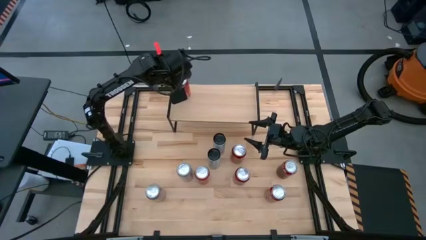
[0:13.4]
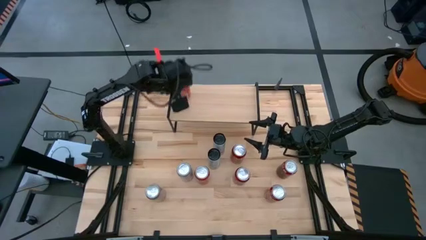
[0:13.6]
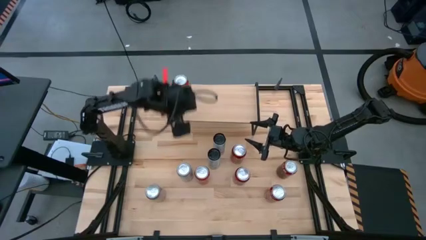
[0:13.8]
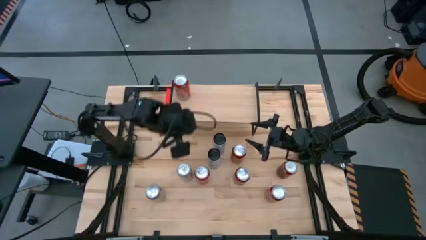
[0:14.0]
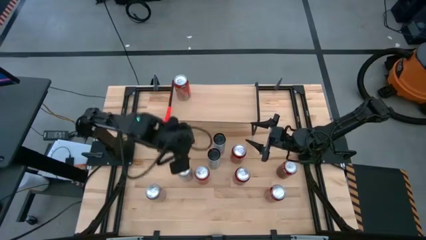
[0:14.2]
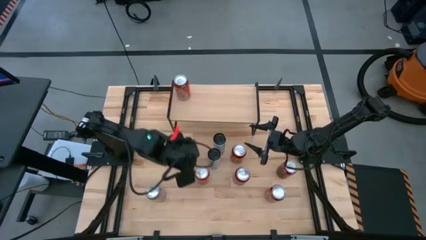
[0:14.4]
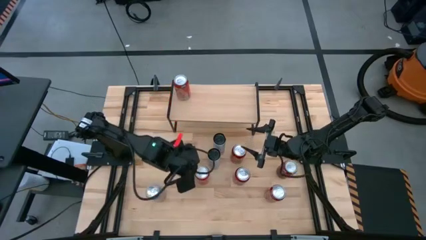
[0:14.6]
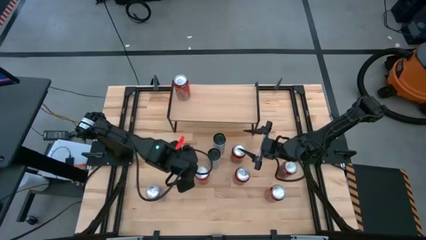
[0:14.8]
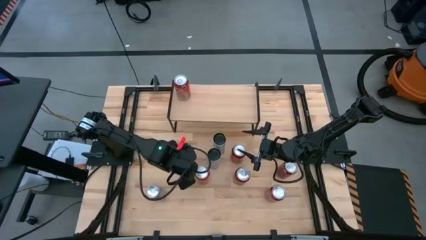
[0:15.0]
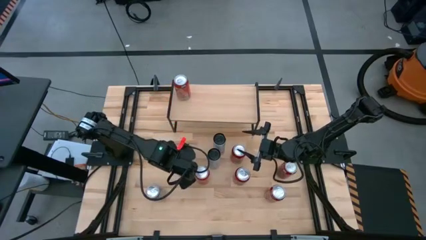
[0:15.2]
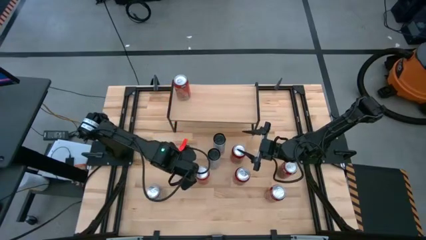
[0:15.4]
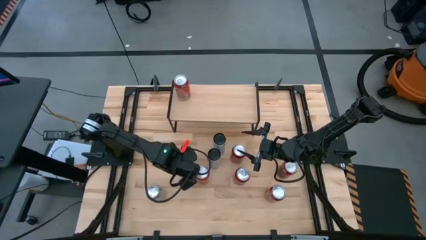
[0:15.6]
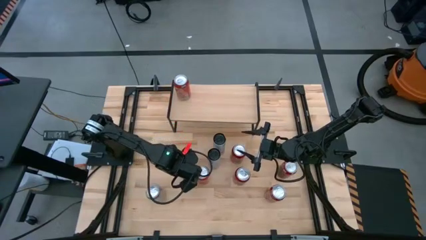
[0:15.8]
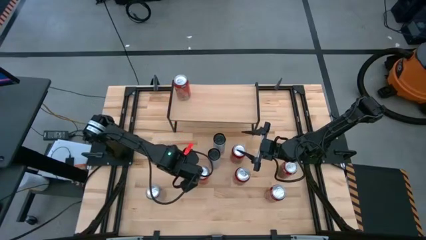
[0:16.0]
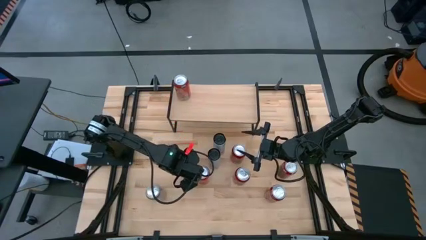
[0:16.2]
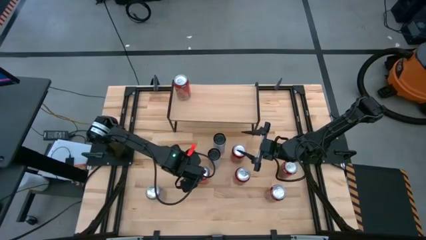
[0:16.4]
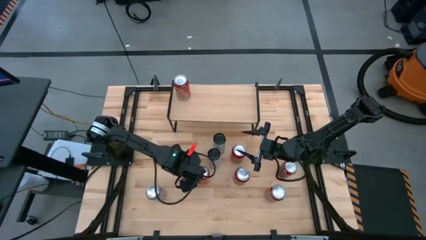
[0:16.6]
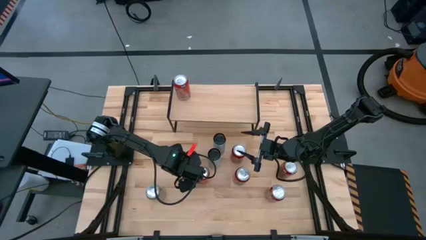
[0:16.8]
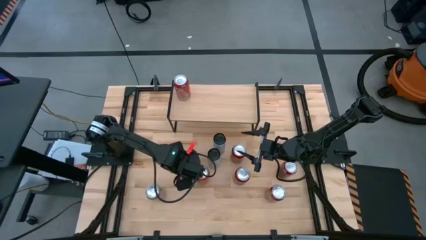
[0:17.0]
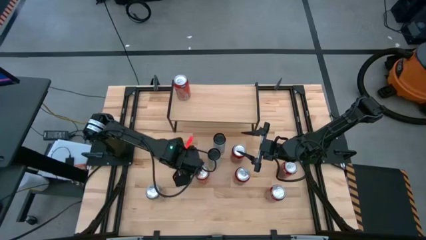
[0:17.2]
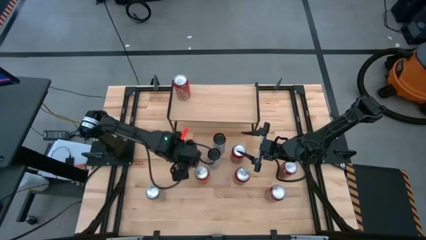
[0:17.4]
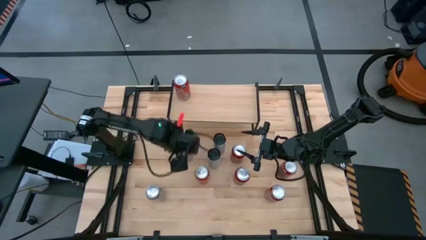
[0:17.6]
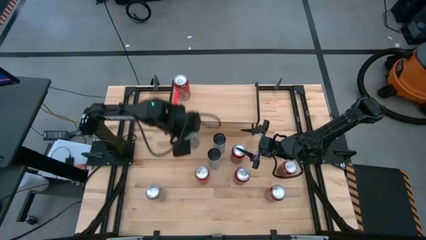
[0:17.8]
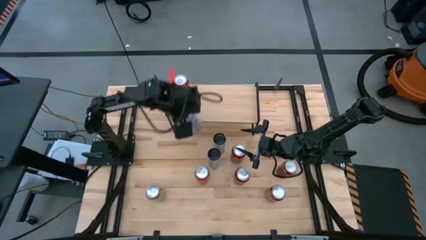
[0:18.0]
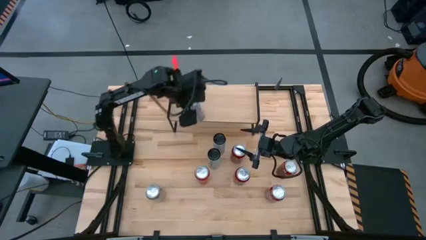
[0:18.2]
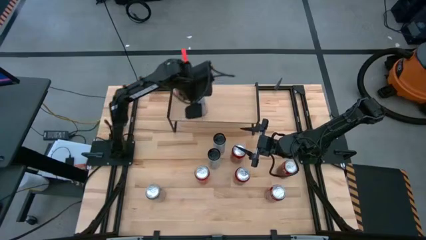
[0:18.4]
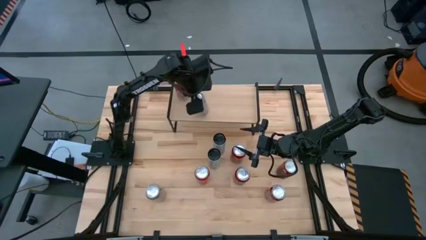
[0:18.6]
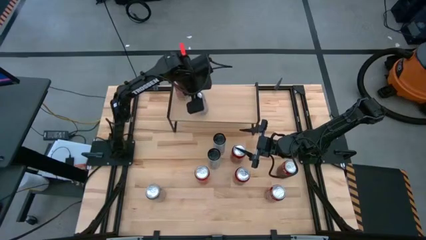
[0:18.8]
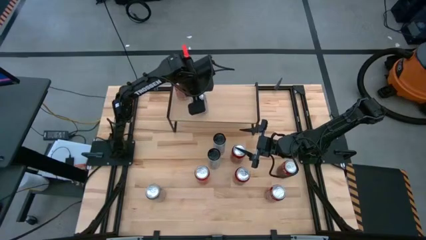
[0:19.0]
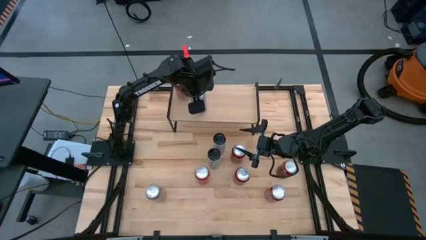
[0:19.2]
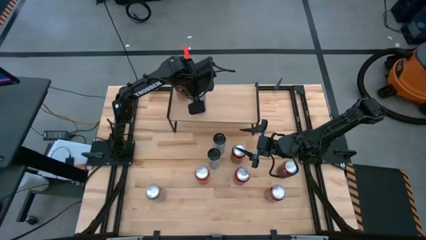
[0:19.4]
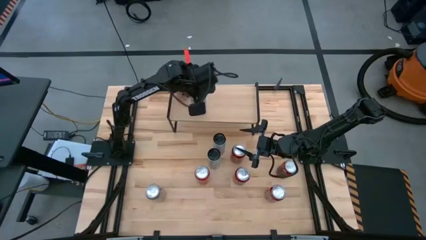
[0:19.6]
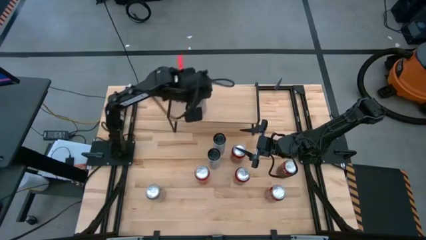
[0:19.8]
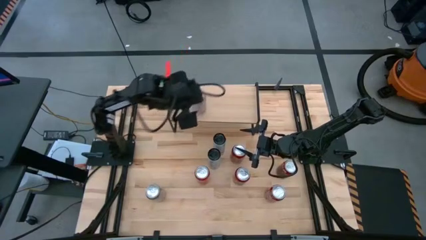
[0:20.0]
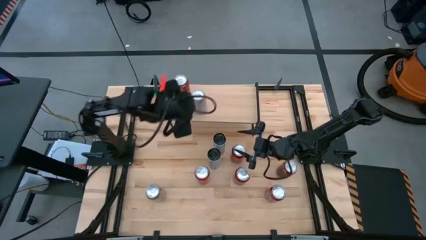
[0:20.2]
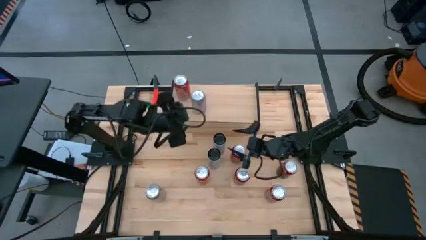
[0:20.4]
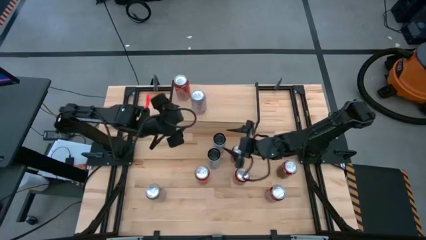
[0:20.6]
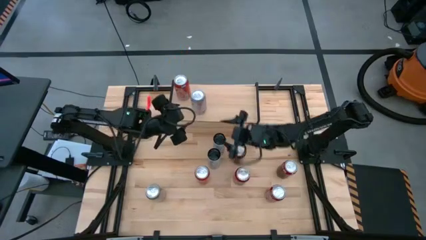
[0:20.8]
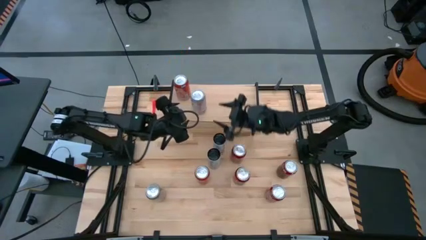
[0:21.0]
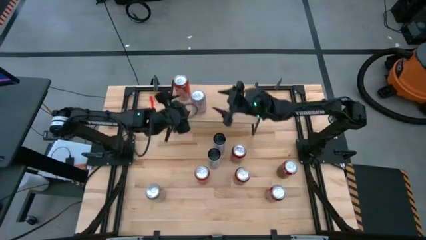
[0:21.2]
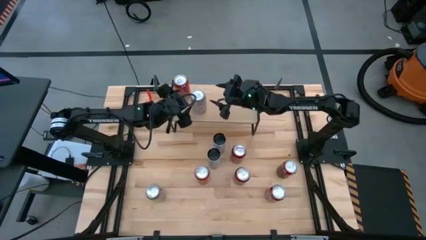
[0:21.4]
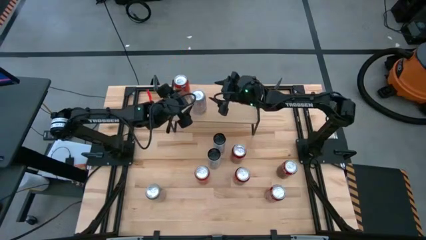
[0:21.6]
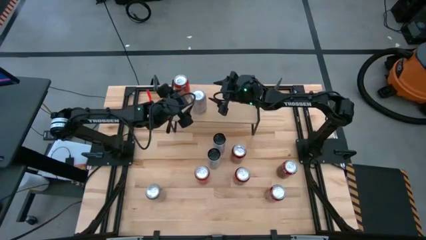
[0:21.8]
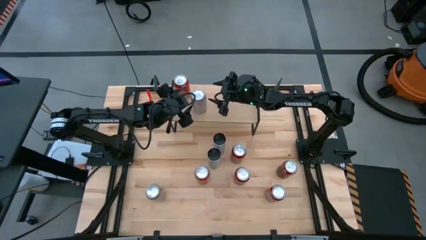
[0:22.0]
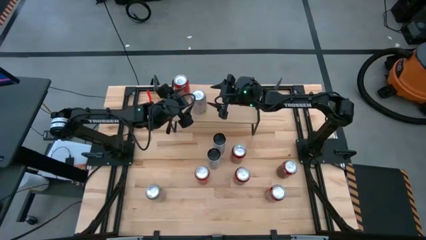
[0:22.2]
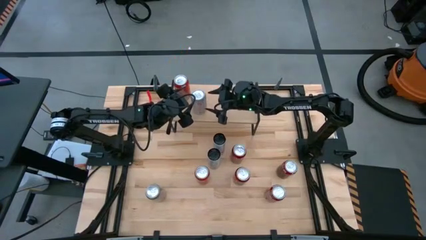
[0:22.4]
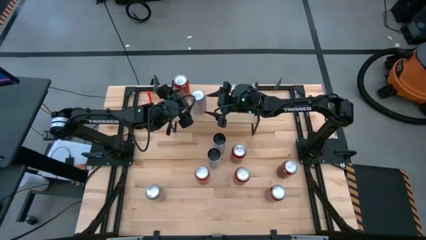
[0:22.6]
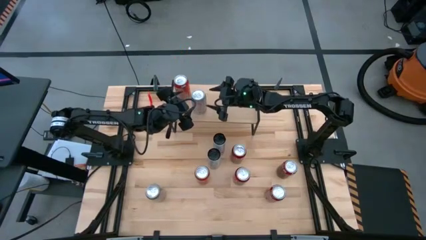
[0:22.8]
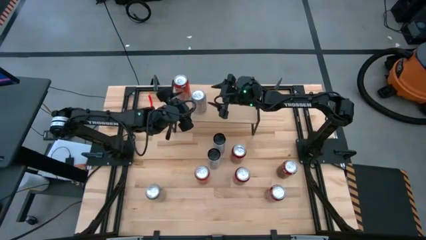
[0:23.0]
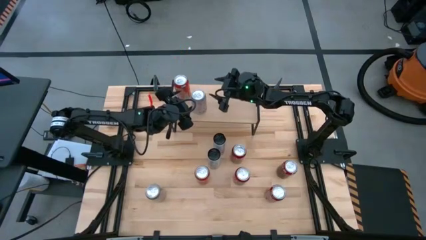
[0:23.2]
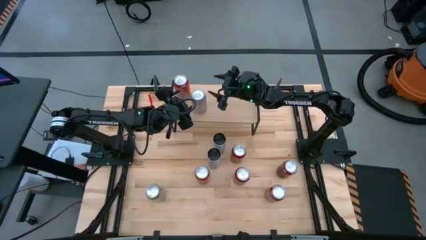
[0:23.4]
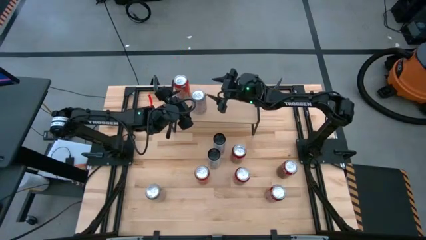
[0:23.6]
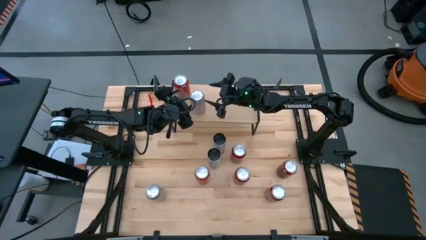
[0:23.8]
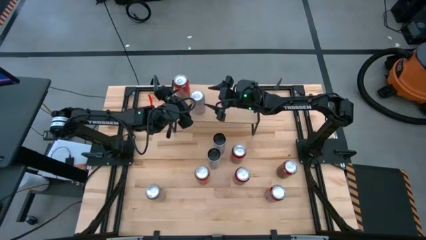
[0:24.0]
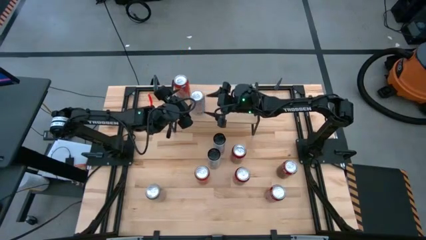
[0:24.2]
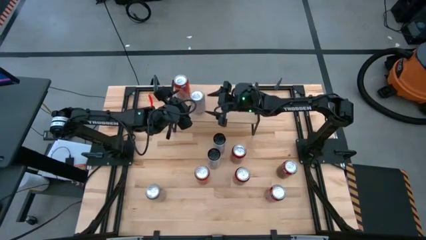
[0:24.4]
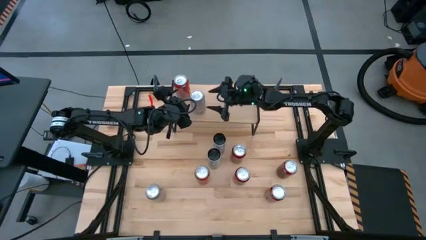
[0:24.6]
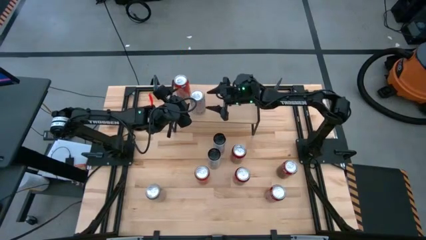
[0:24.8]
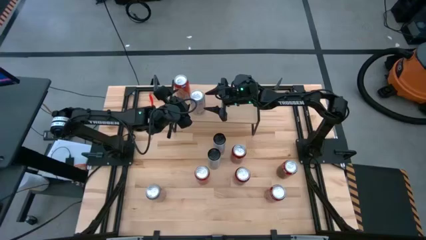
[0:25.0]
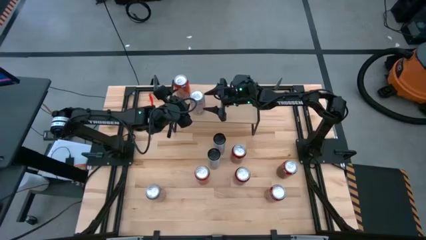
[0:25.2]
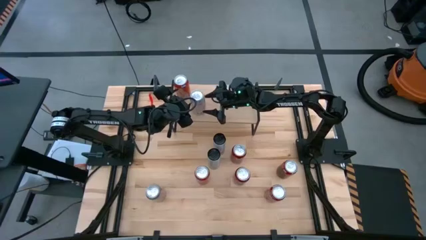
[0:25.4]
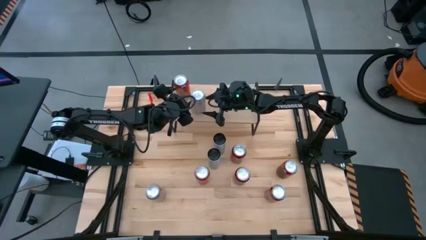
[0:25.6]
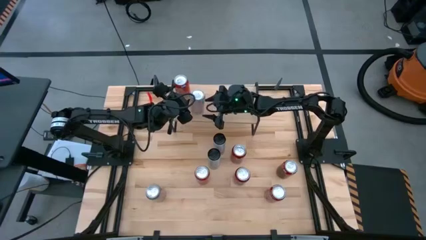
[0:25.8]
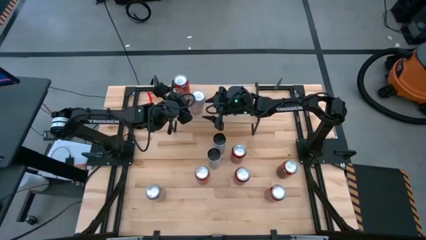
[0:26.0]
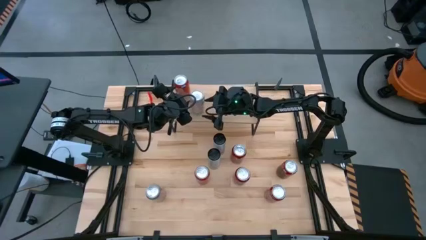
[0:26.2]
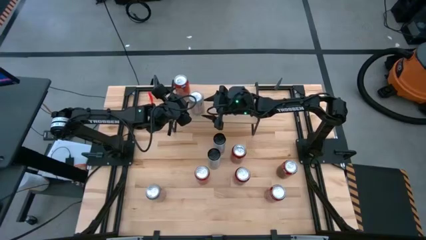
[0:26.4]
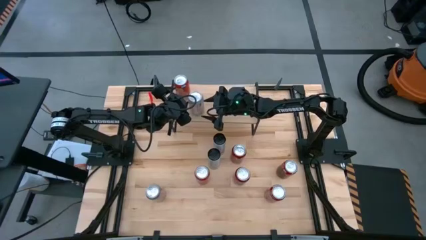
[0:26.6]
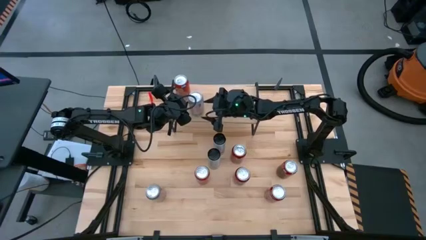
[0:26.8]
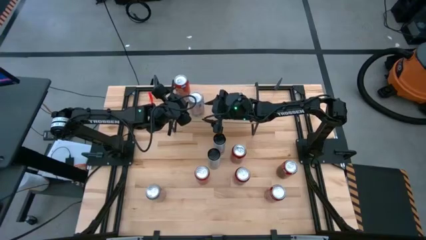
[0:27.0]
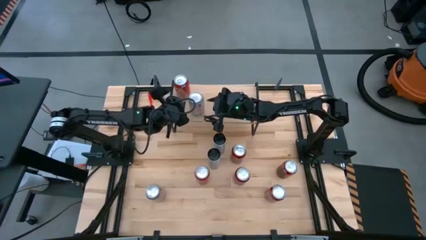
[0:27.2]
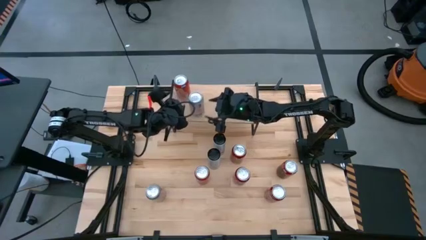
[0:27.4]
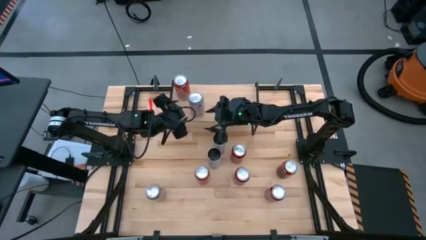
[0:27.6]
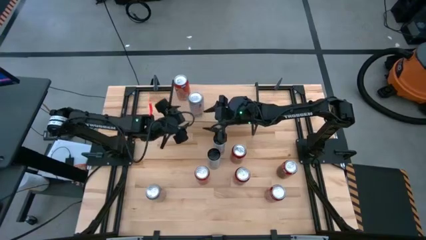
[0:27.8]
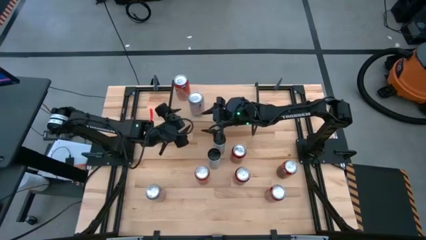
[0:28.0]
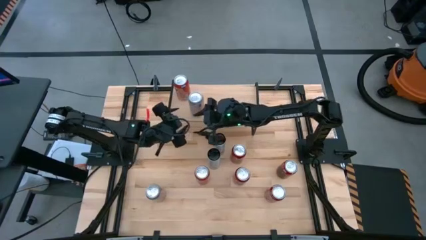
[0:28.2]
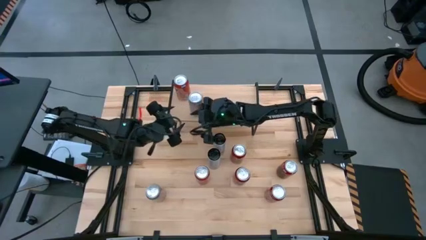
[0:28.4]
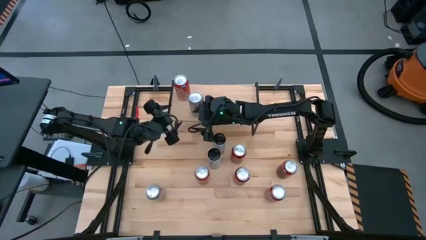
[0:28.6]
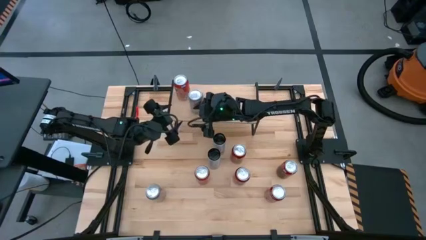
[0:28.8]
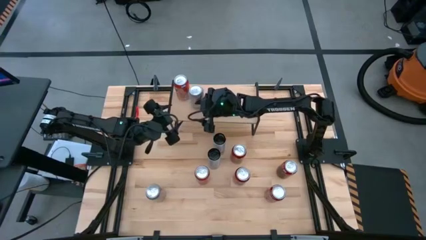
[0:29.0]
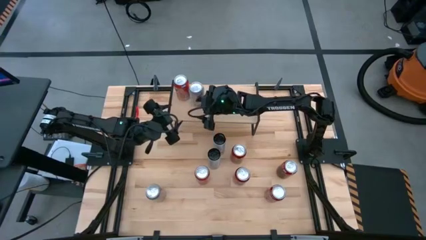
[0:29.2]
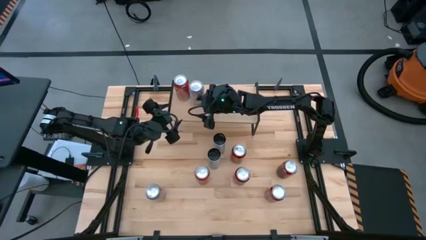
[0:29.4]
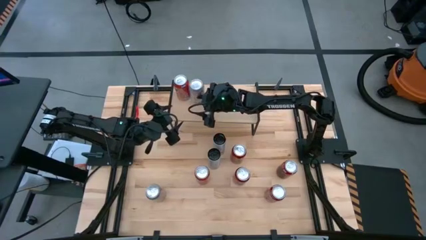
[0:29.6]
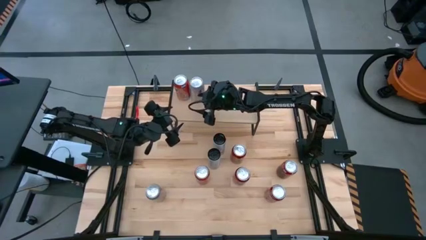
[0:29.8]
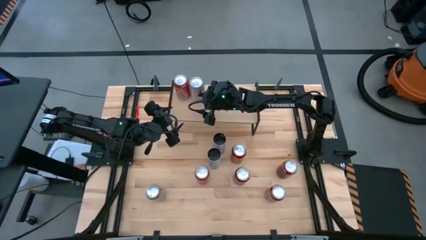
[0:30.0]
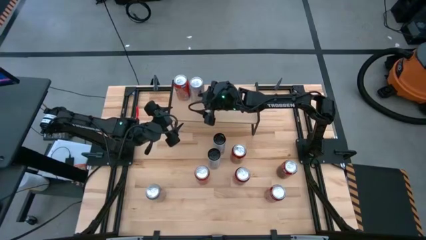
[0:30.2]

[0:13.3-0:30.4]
Task: Place canned beverage on shelf
Put the top silver soda can on the shelf
